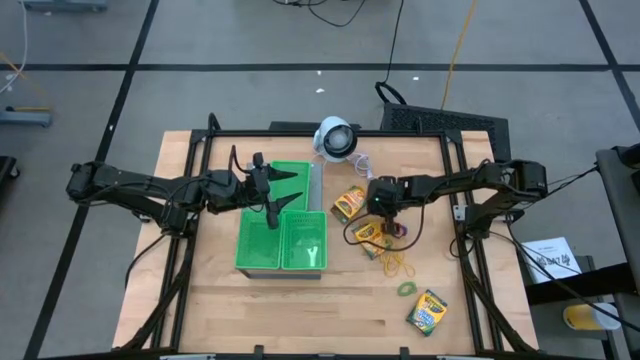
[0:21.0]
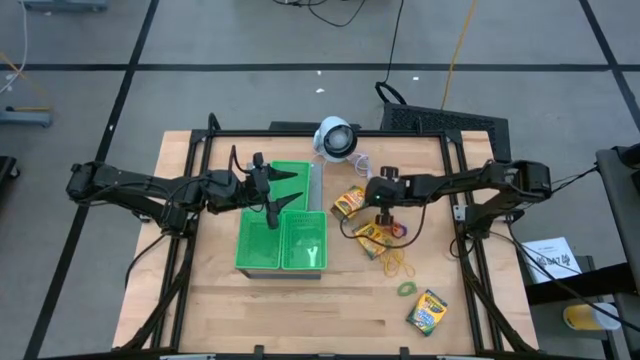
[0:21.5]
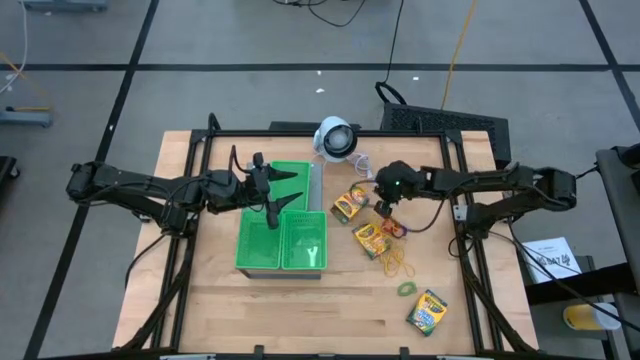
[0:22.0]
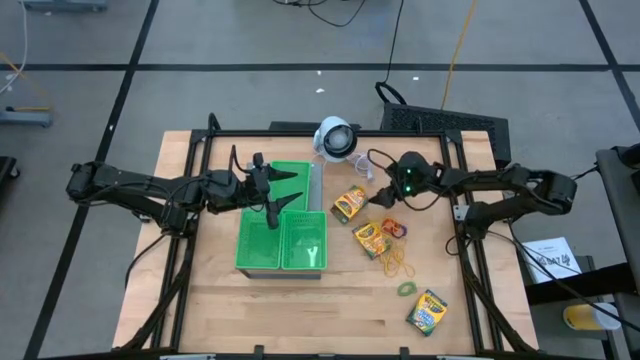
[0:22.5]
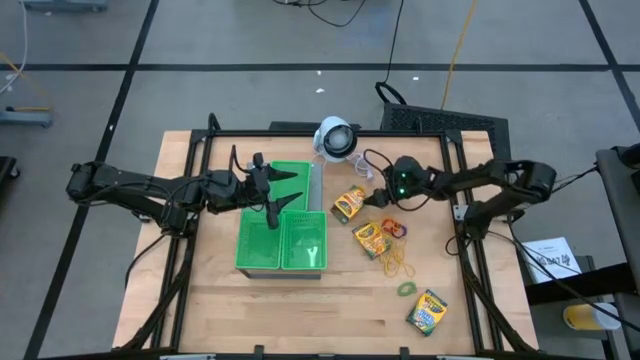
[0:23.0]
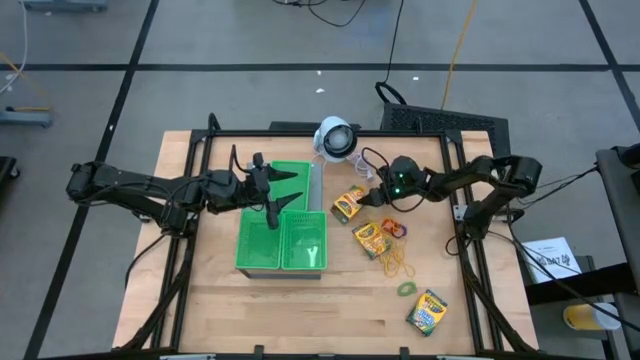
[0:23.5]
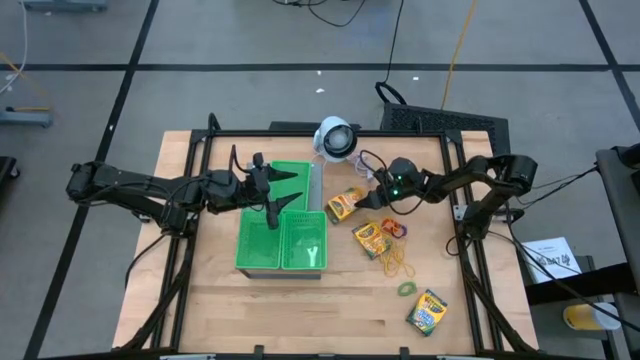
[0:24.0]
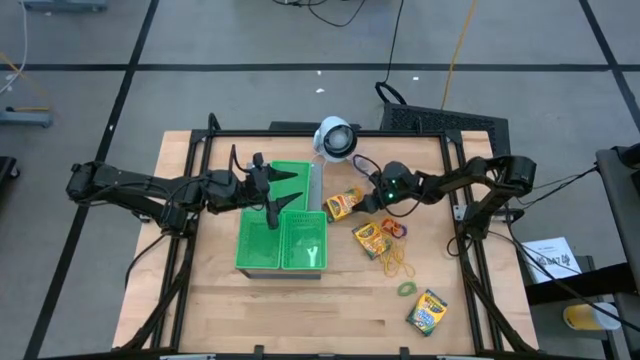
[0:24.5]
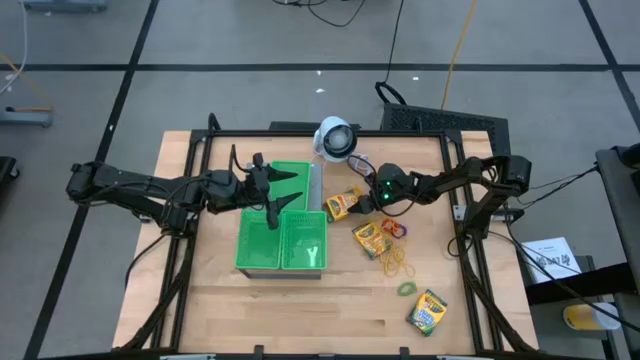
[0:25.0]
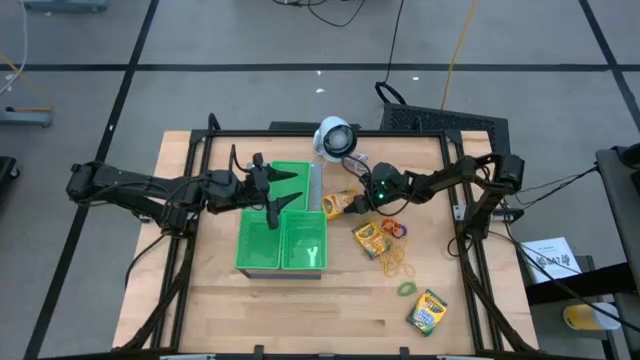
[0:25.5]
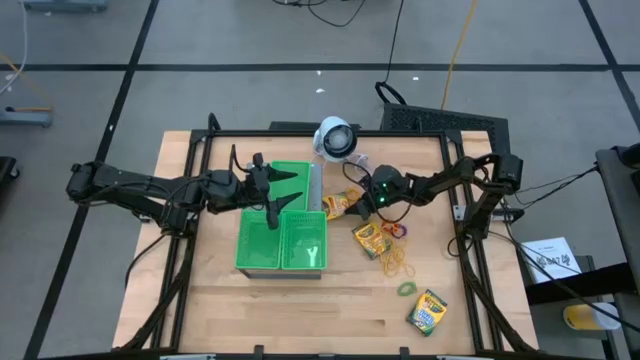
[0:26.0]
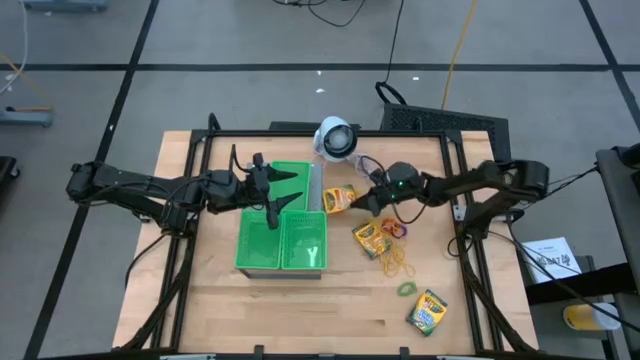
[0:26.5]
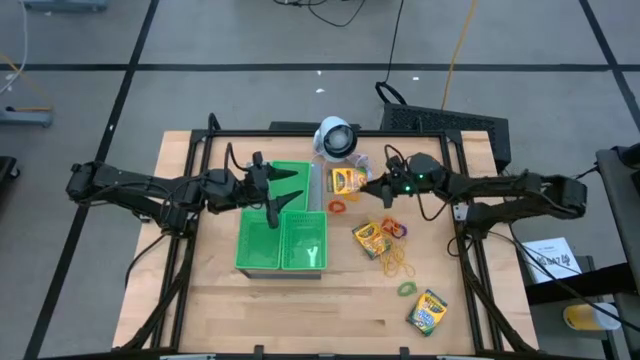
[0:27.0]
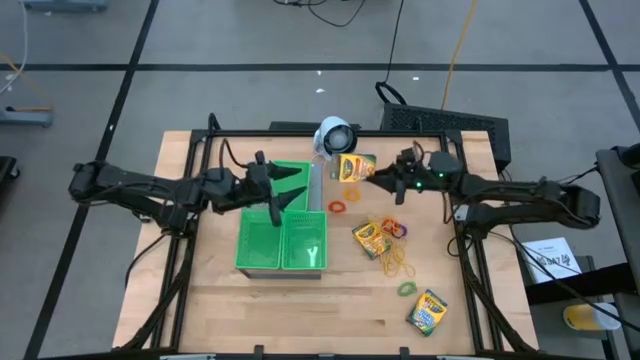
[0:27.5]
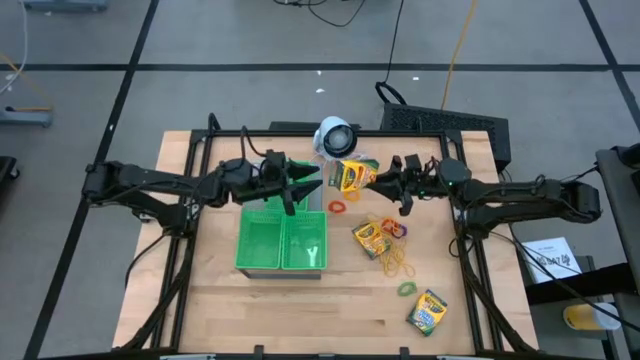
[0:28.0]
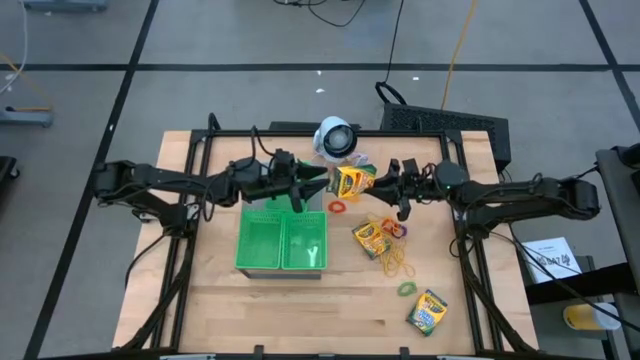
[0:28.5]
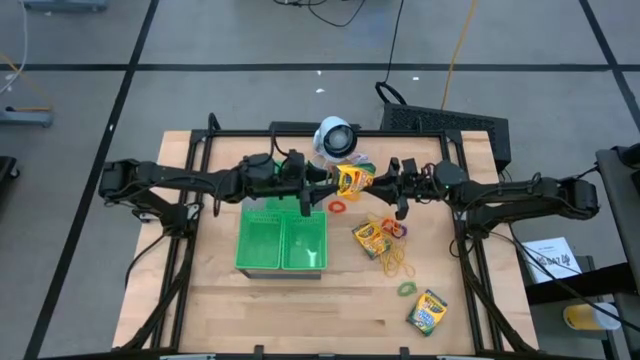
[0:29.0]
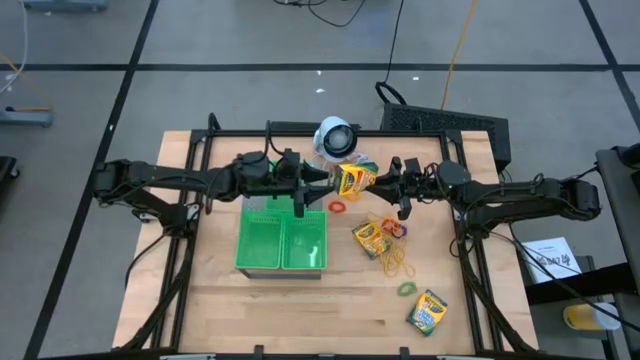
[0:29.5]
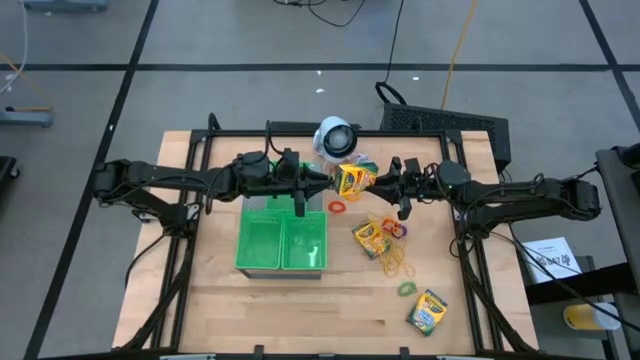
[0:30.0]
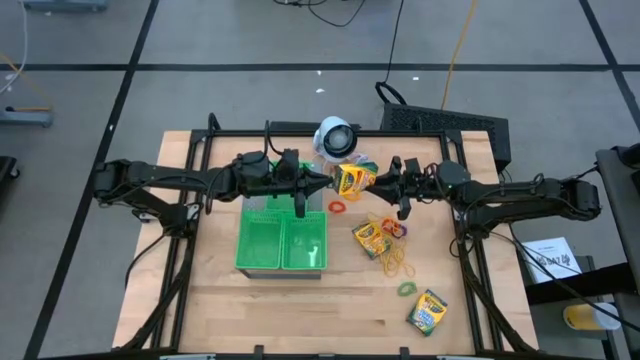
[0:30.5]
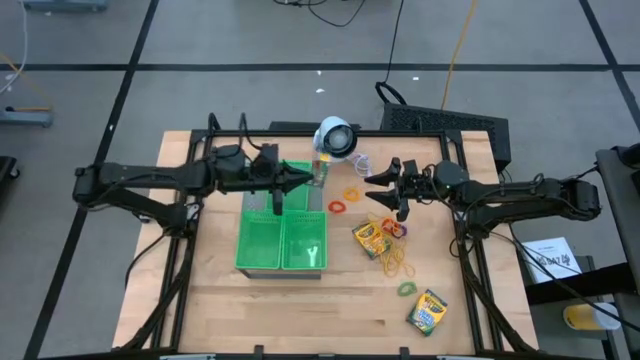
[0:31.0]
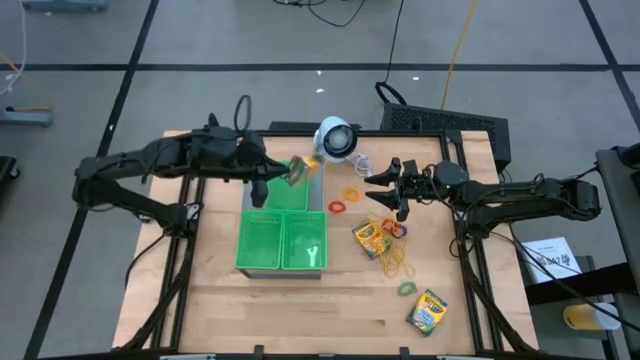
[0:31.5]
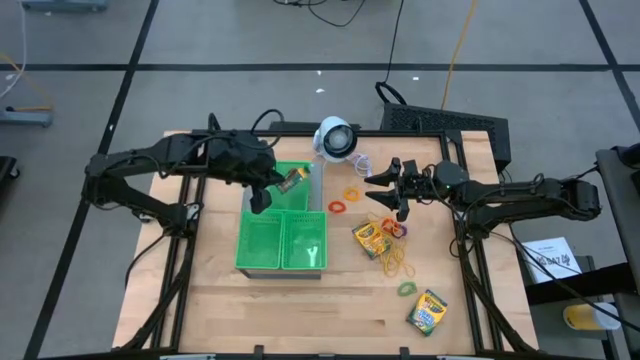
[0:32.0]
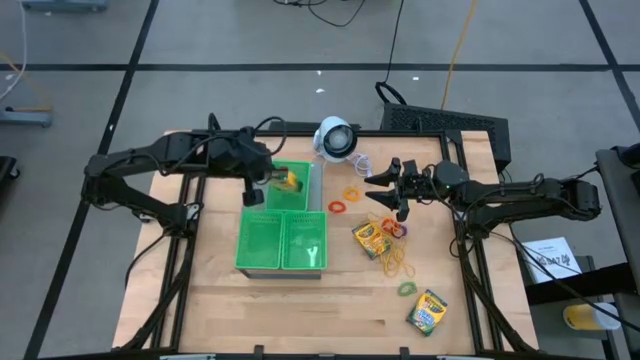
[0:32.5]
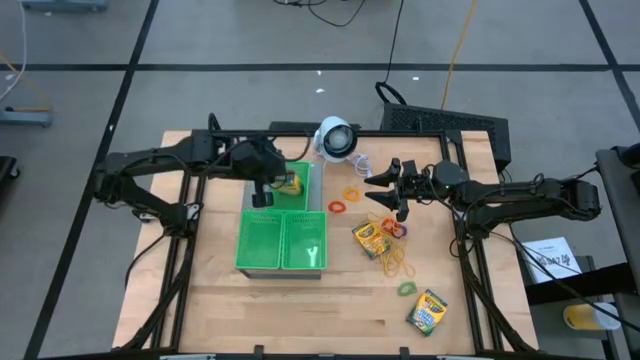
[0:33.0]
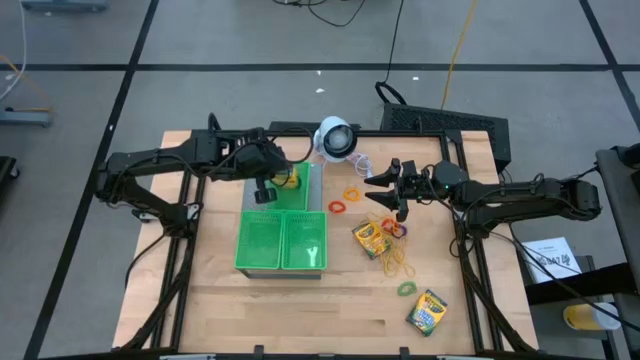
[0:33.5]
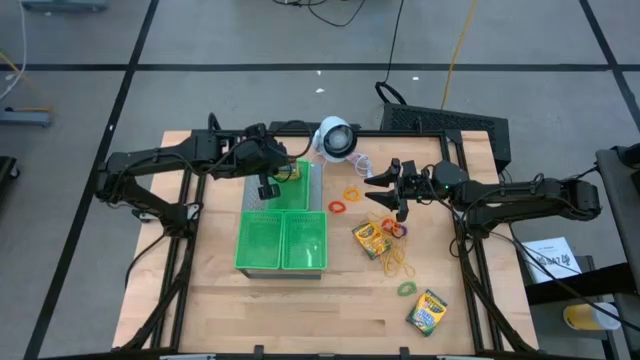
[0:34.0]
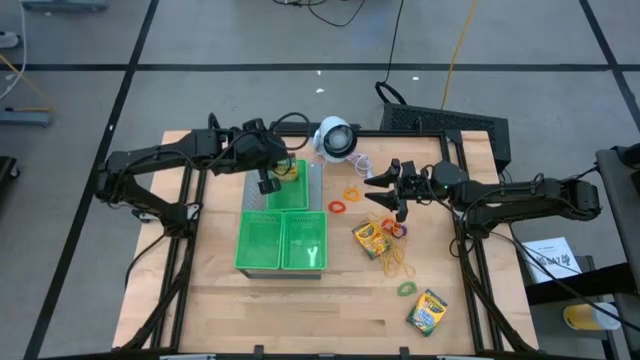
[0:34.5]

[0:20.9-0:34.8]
Task: Pick & Place Office Desk Supplies
Put the crayons box into the top green basket on the shelf

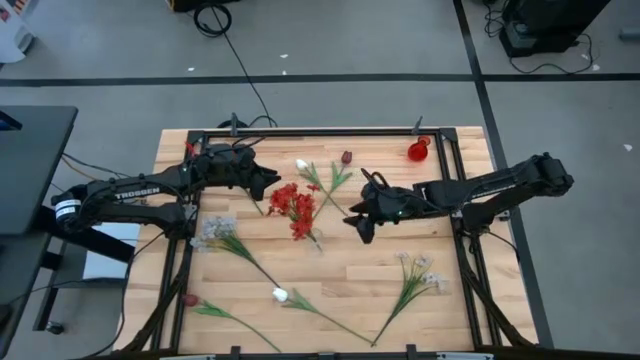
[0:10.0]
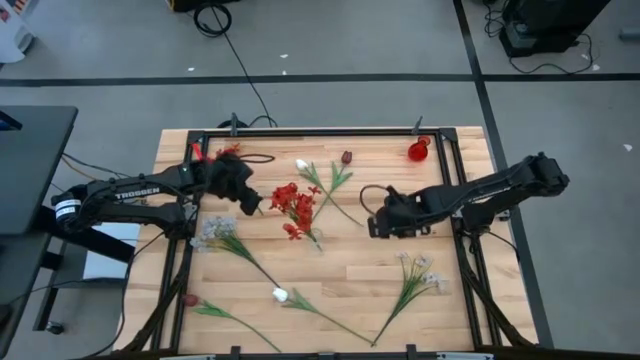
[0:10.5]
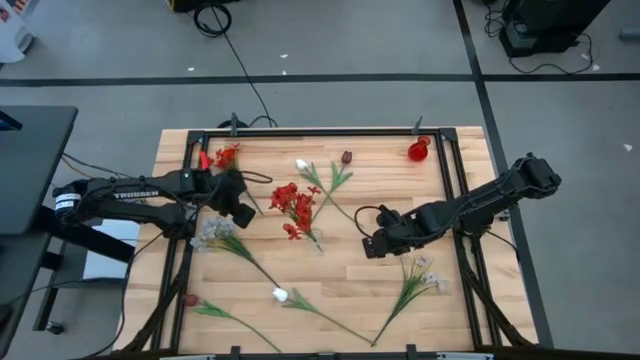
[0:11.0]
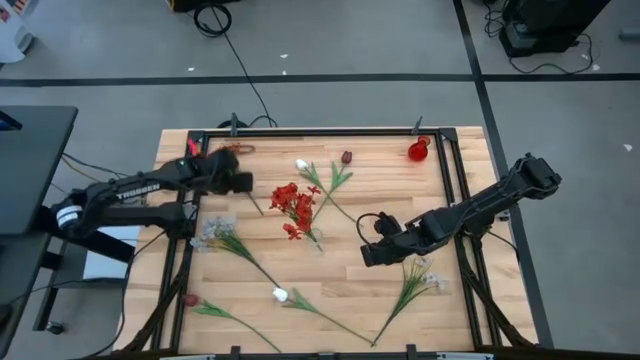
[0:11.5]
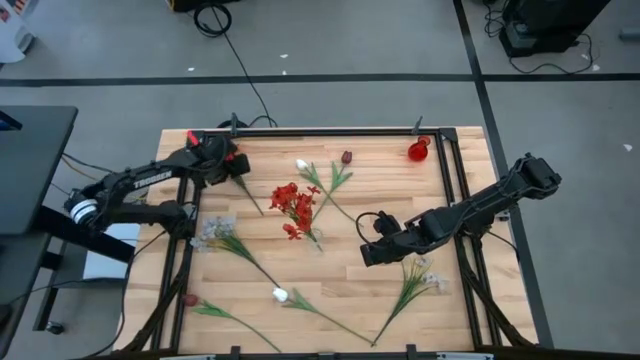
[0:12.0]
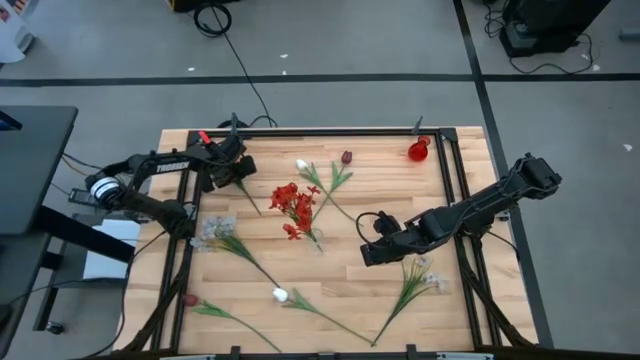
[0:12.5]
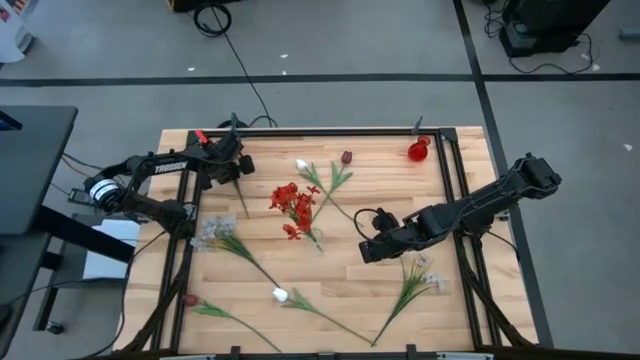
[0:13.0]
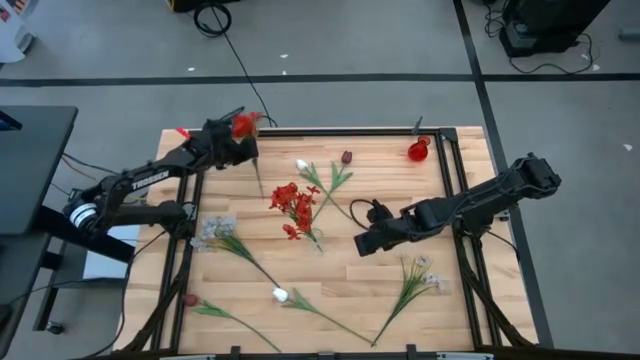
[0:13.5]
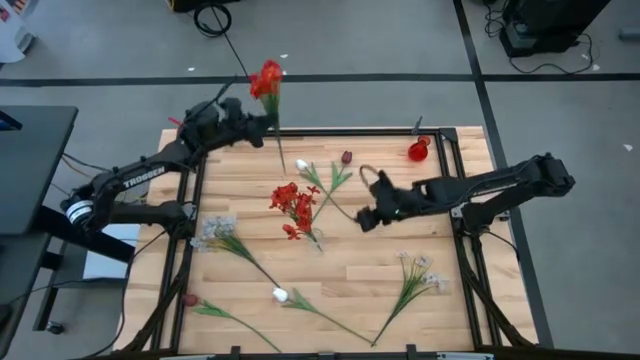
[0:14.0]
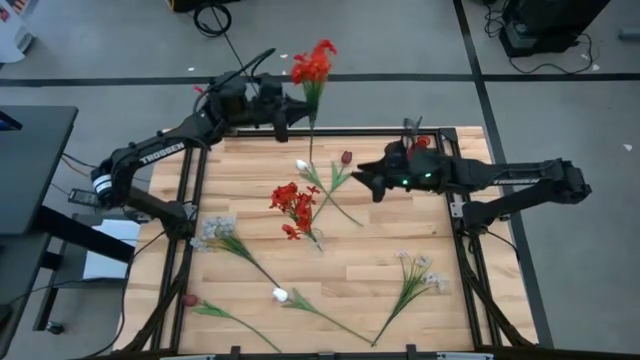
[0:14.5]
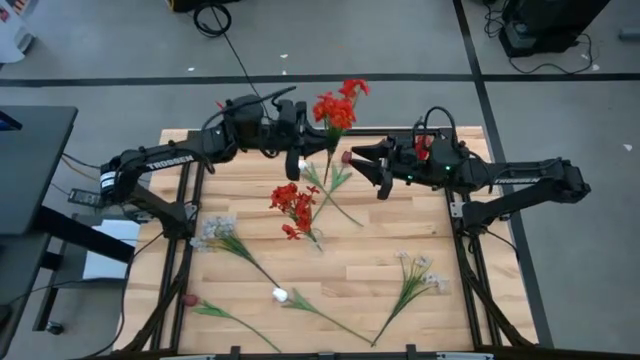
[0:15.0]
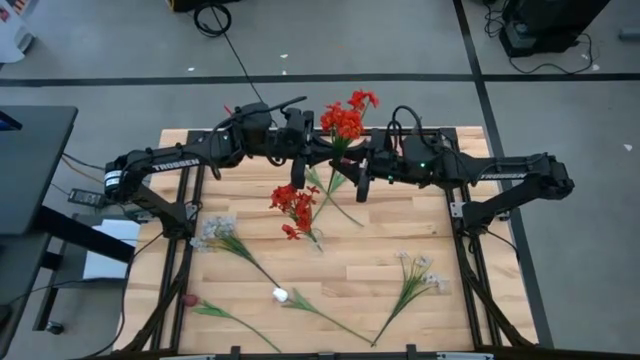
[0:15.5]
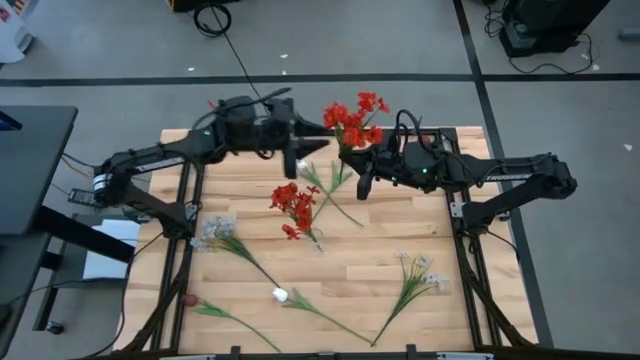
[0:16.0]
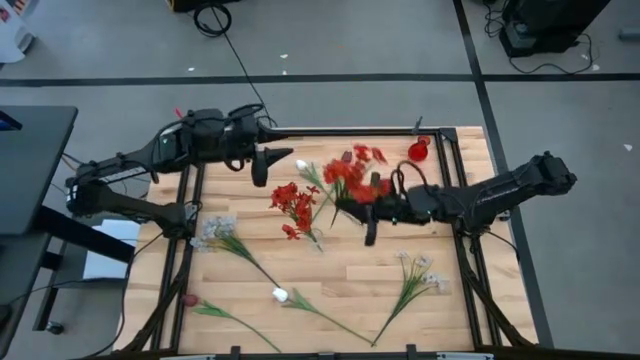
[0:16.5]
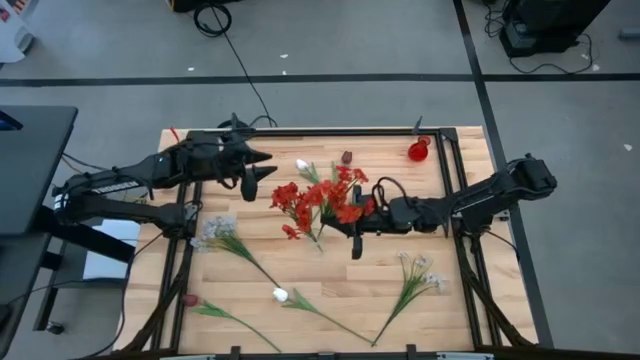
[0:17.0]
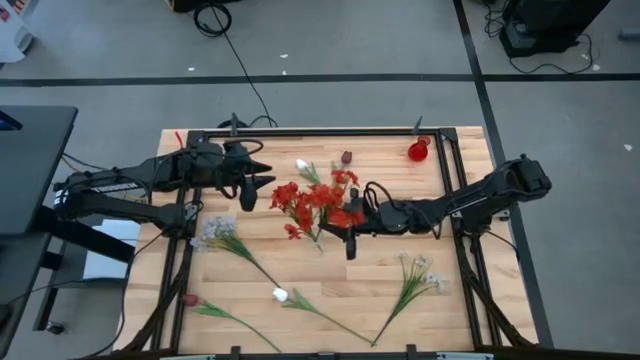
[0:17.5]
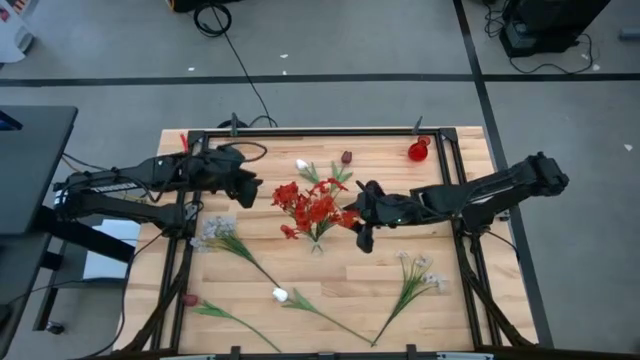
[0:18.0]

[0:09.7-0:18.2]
Task: Sort flowers into vase by color
Put the red flowers into the transparent vase
